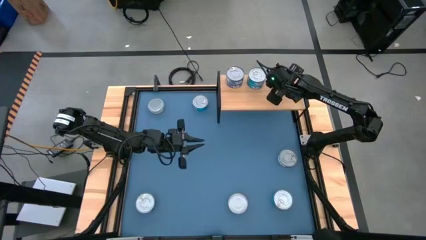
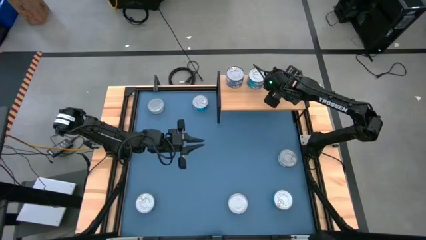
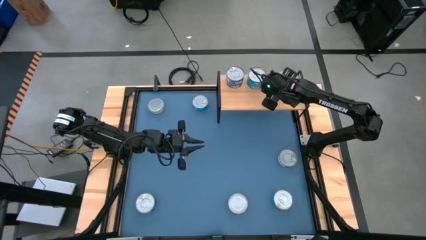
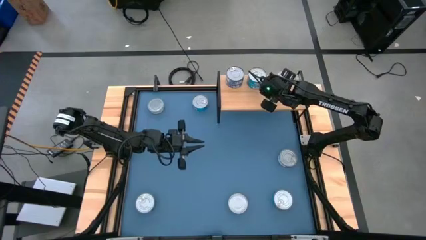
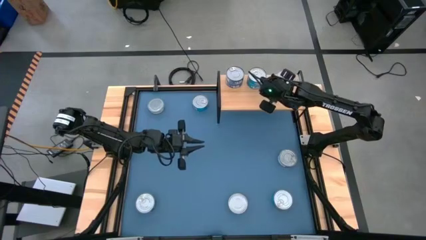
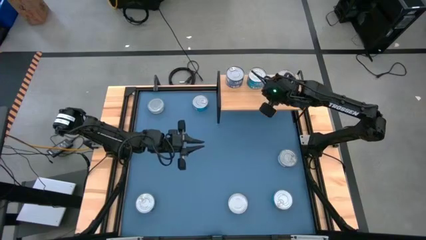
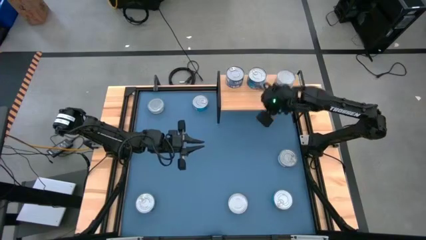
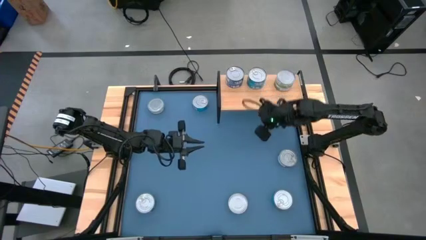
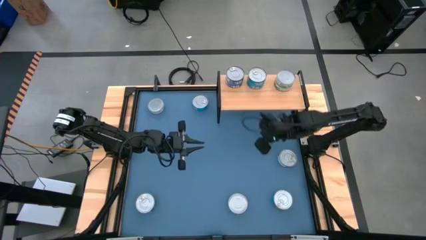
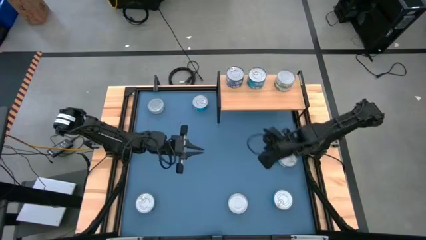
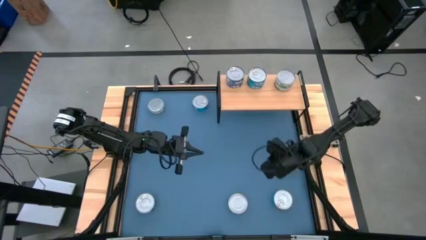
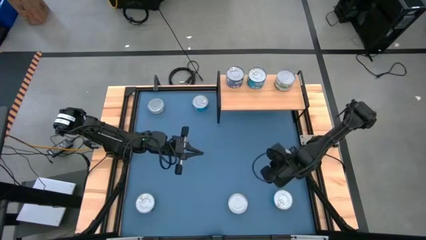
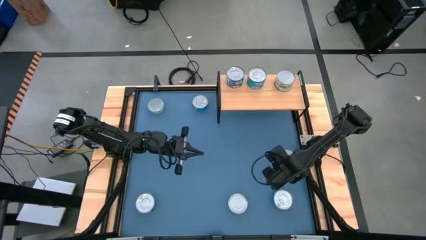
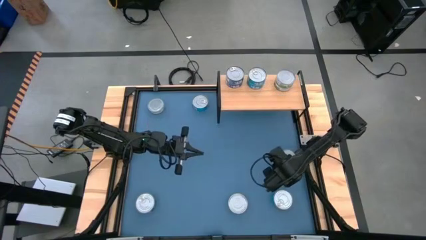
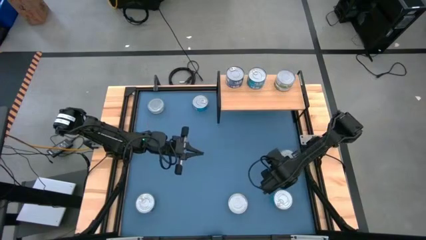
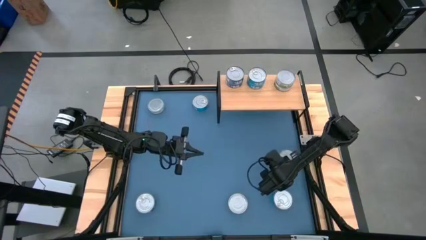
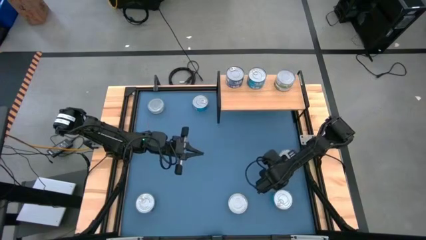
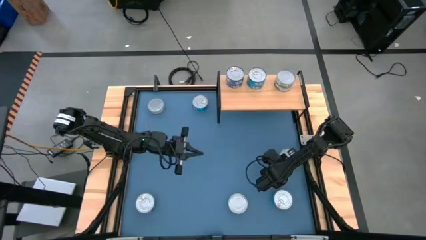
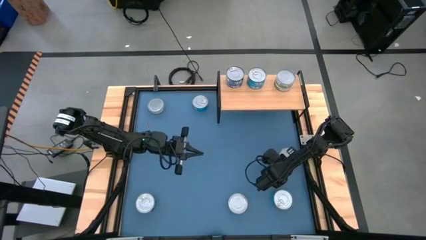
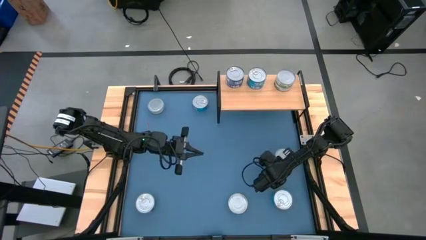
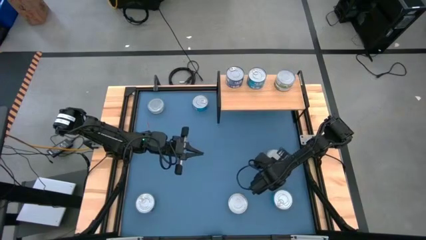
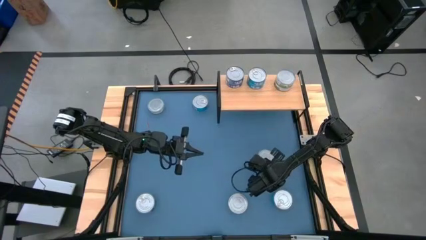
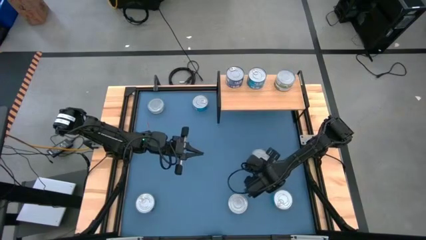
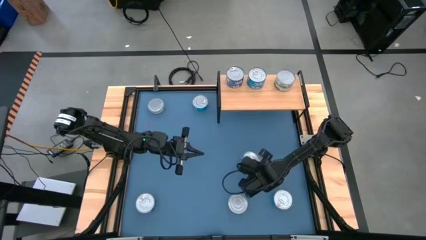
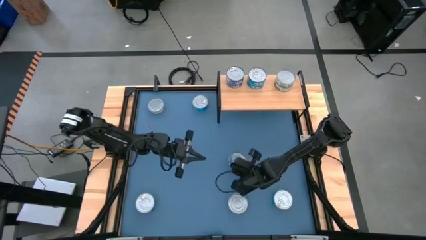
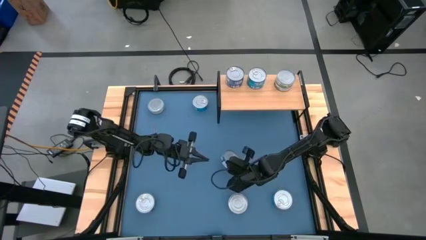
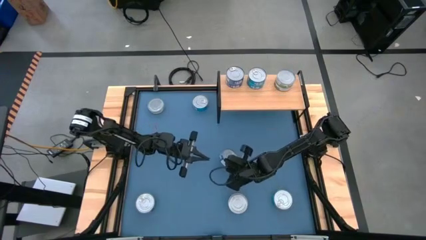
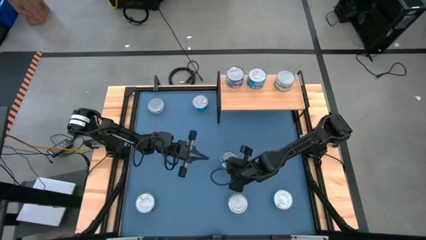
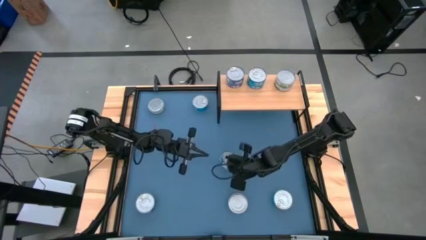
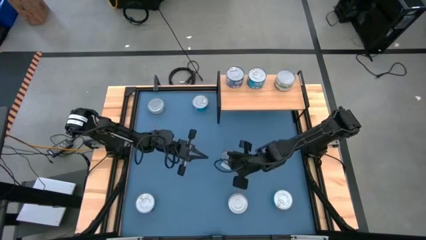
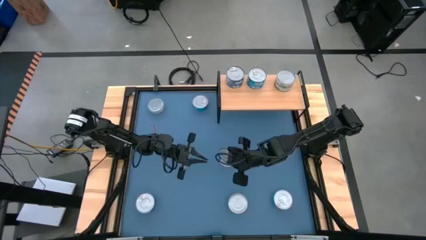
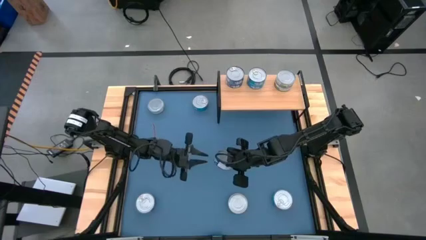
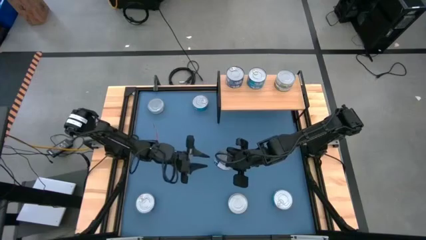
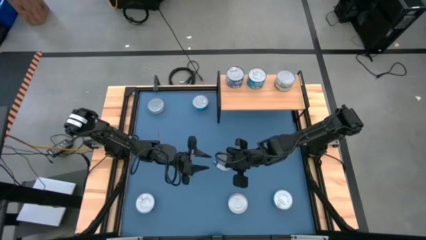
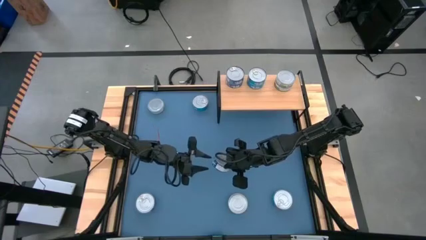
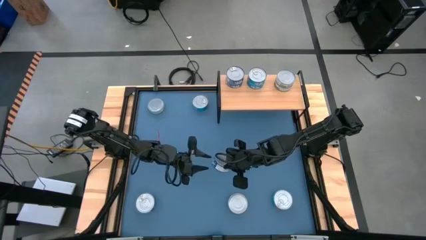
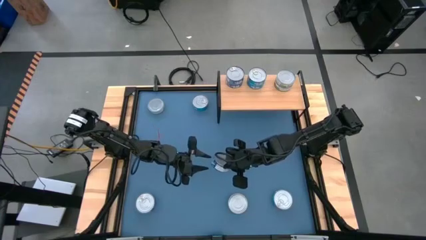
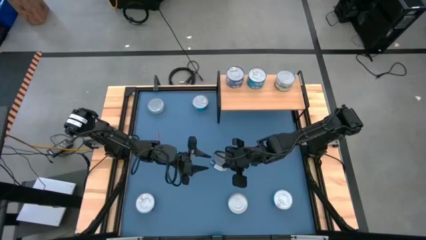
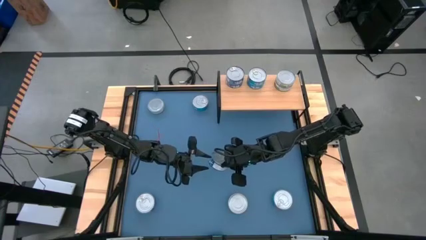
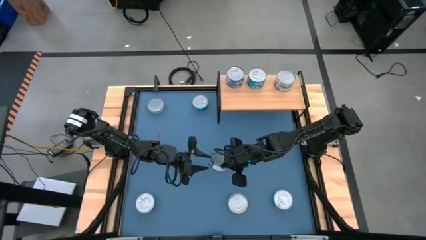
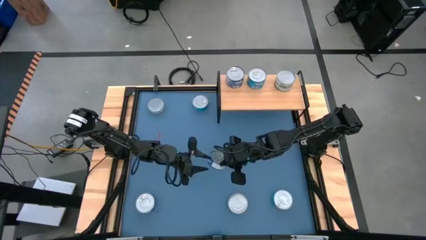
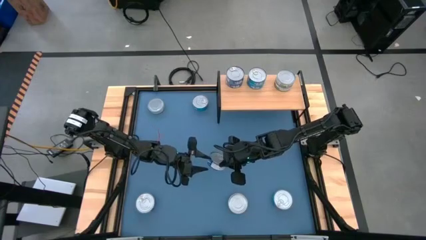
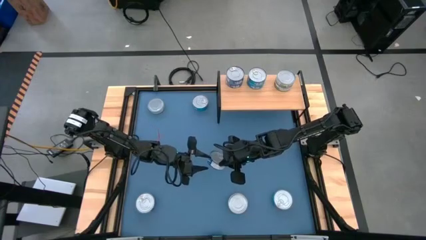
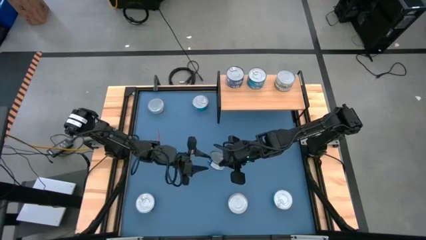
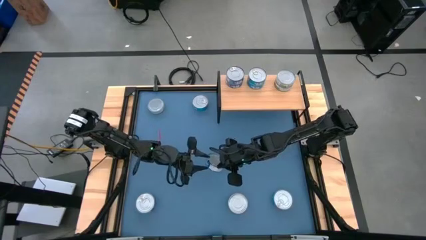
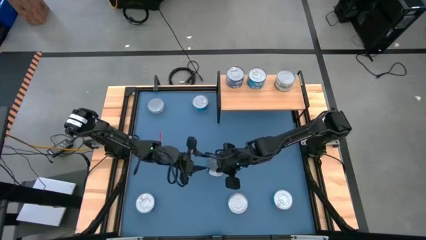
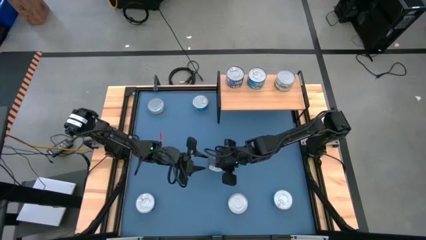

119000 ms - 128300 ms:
Task: Stack canned seafood by type on shelf
Put the right blue tuna can on the shelf aligned with the other blue tuna cans

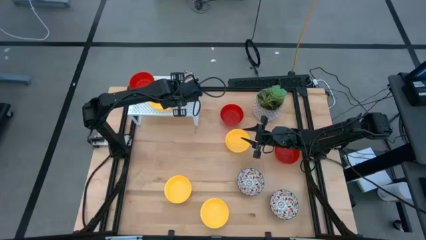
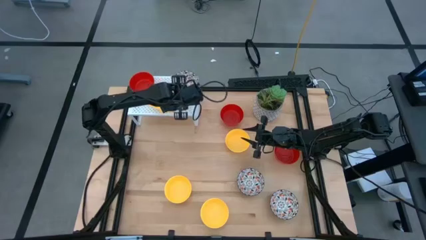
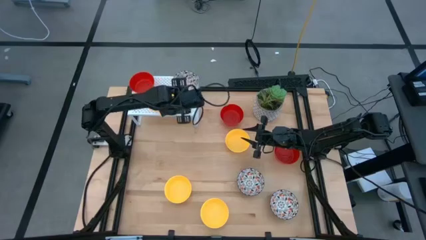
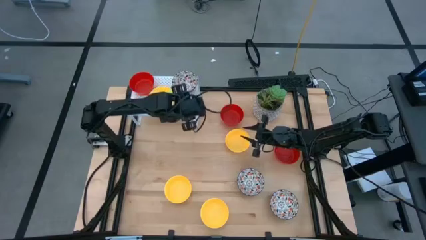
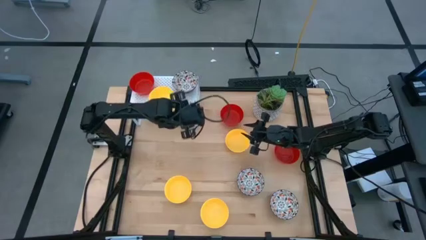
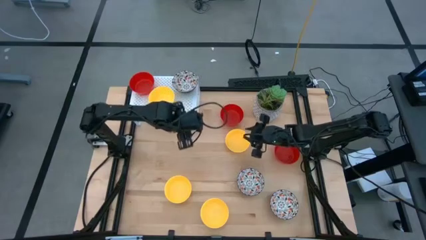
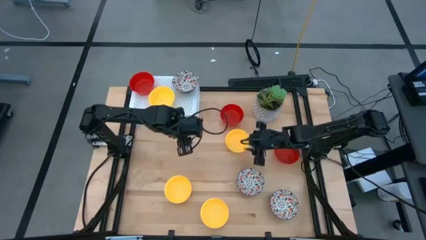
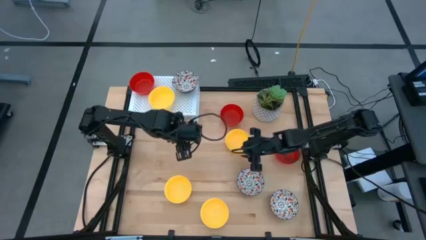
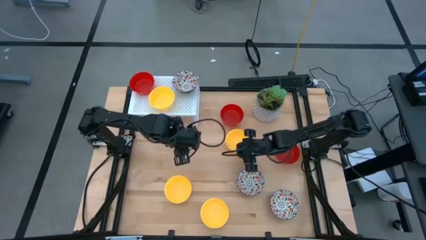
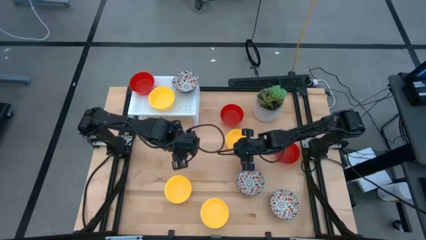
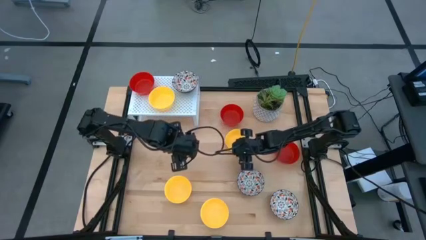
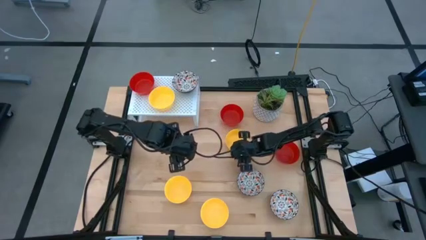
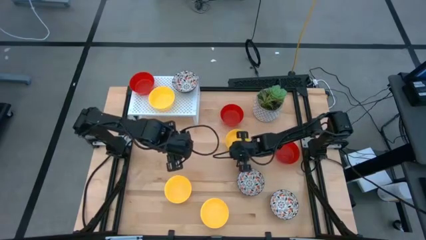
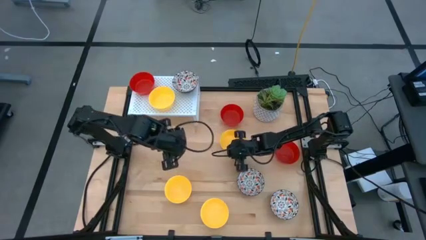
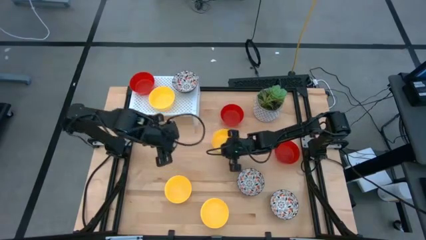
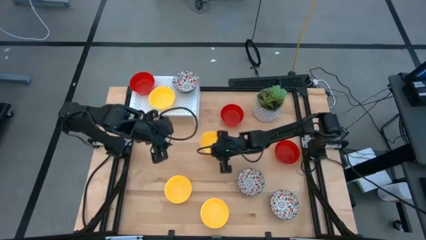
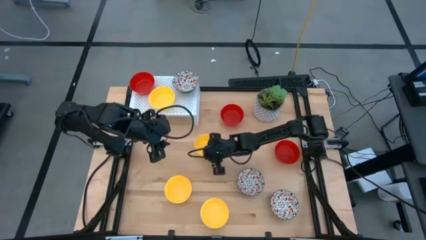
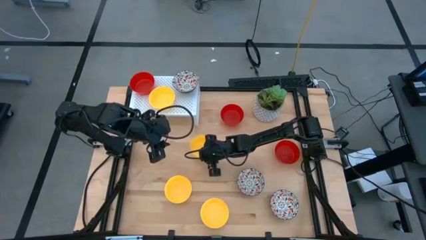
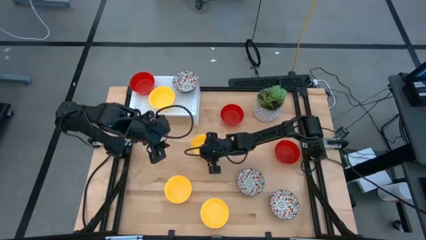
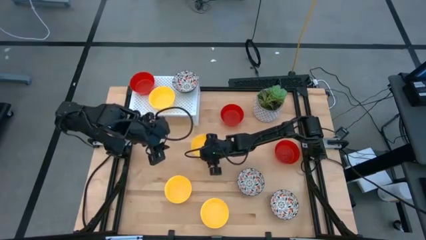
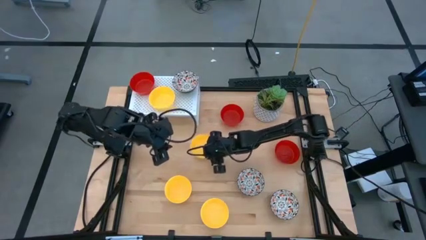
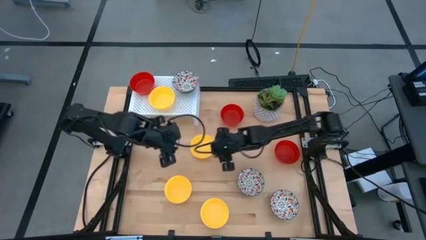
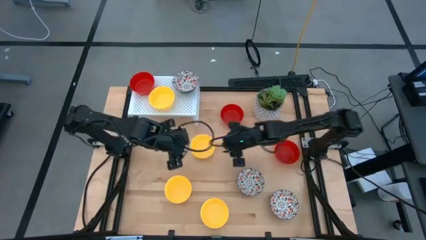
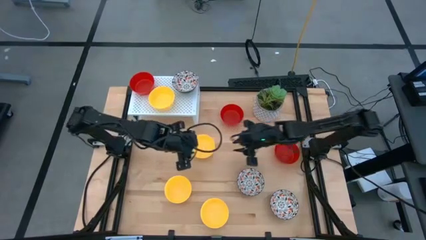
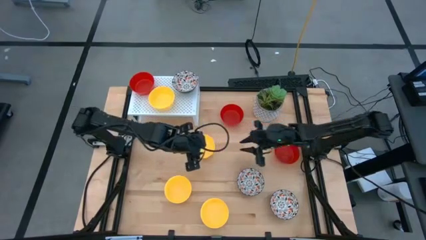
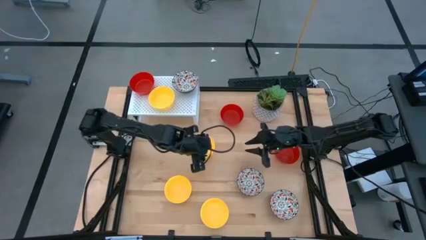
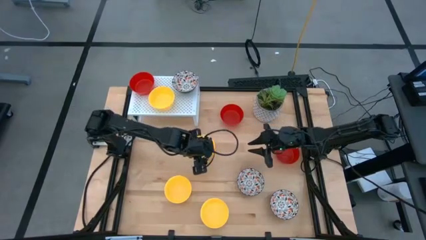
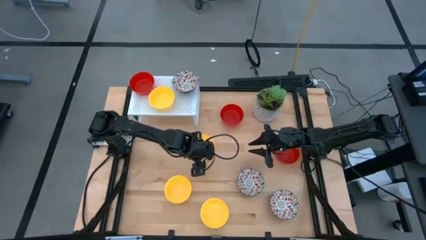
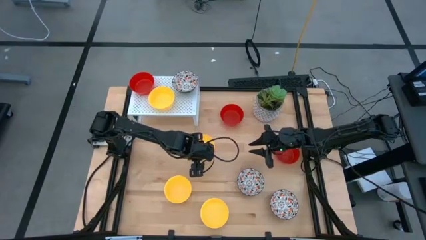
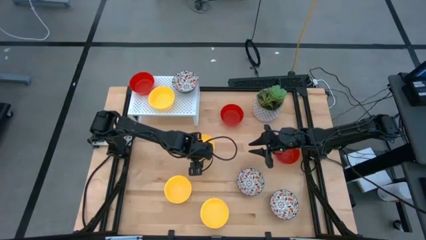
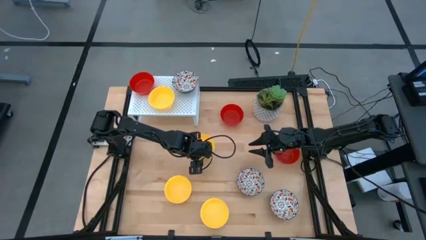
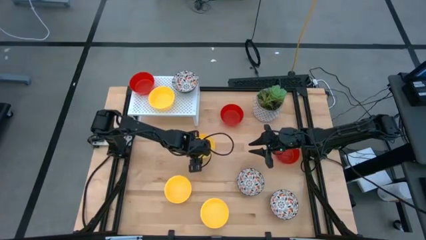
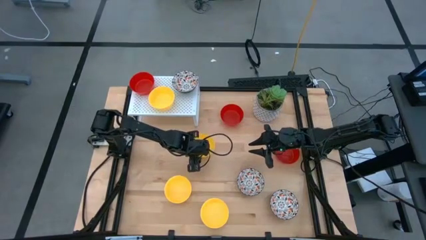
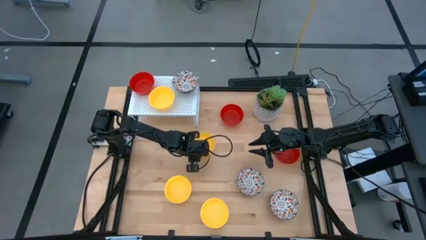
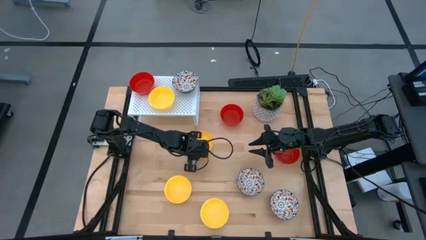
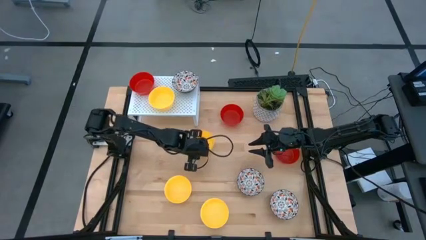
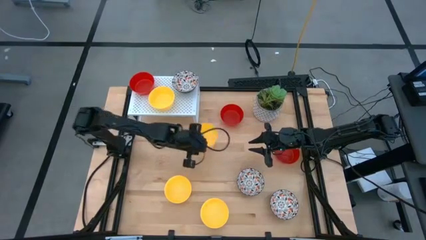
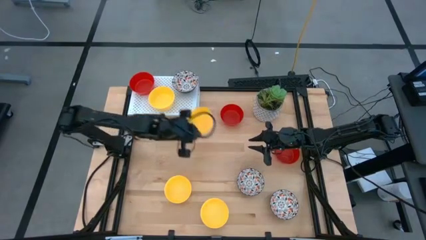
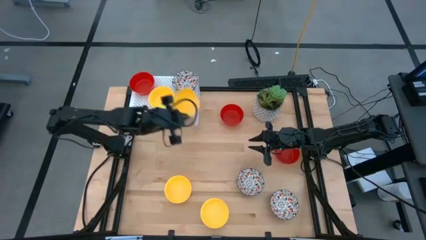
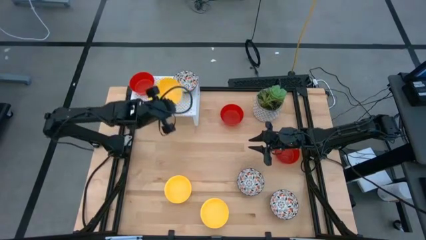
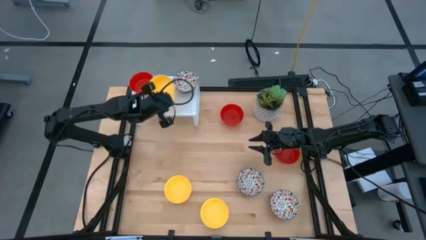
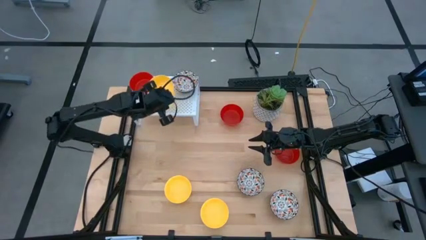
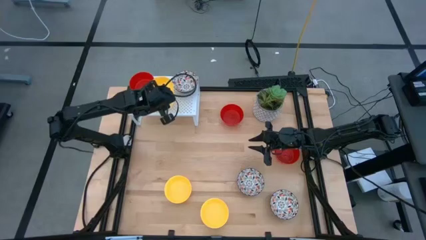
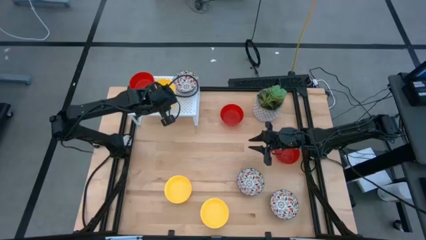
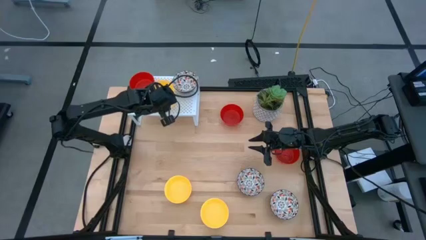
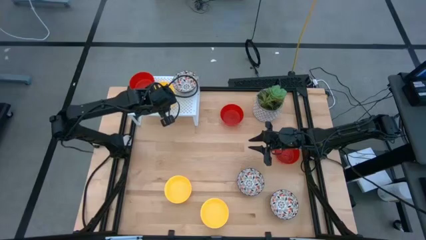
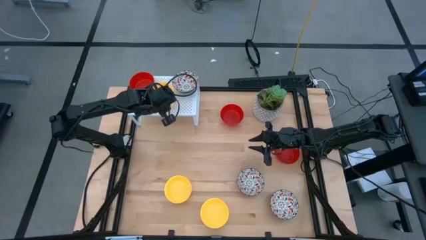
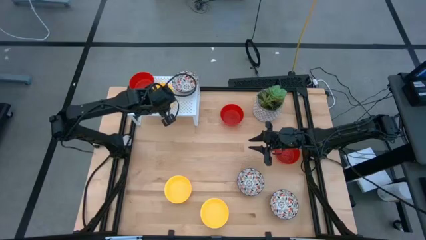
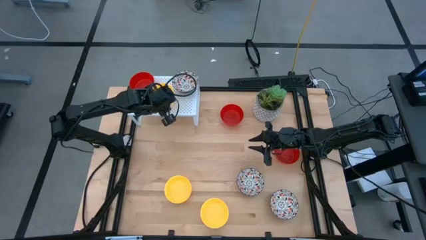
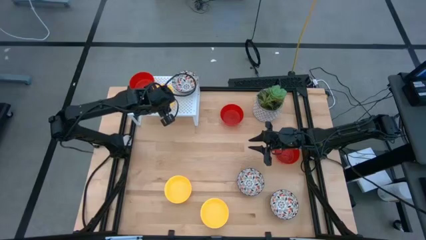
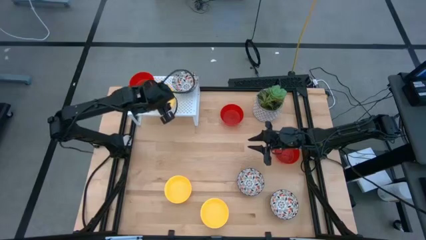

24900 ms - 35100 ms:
Task: Pick & Place Mini bowls
Stack the top yellow bowl on the yellow bowl on the shelf
